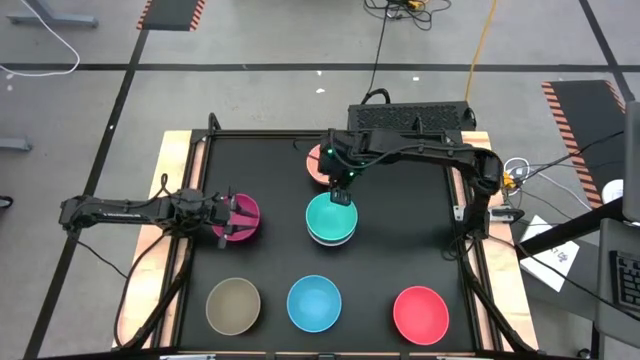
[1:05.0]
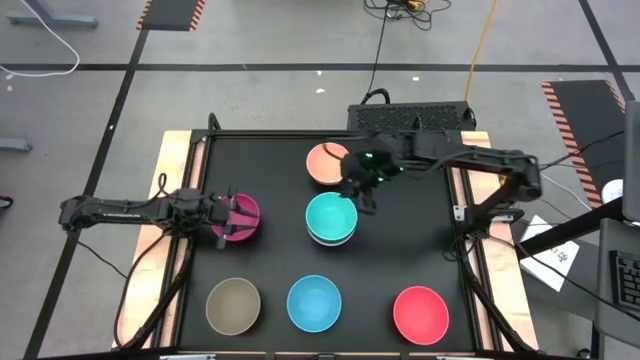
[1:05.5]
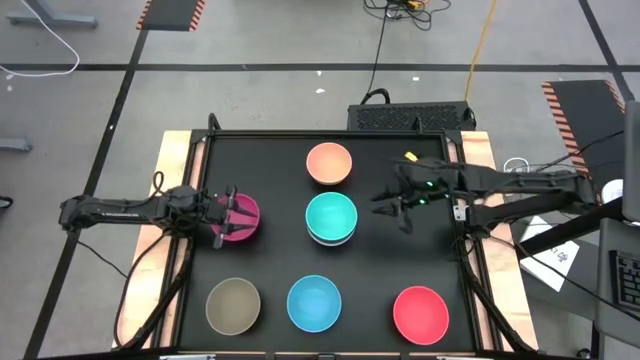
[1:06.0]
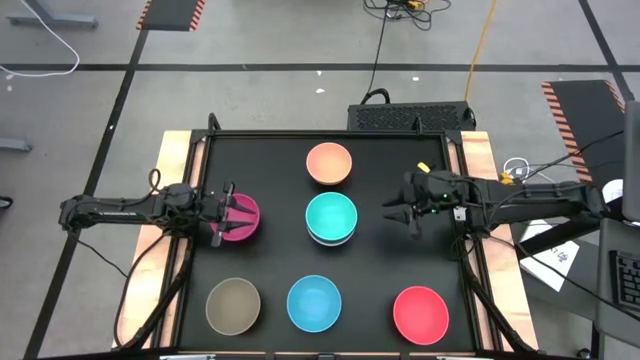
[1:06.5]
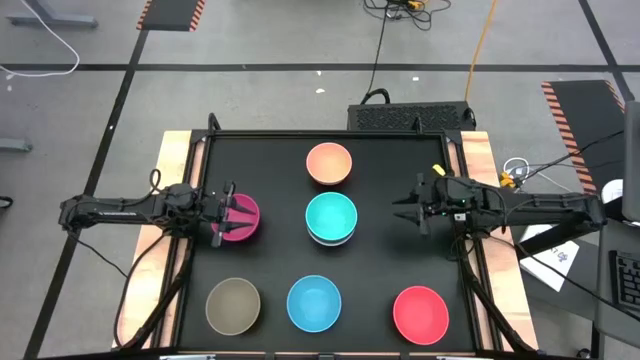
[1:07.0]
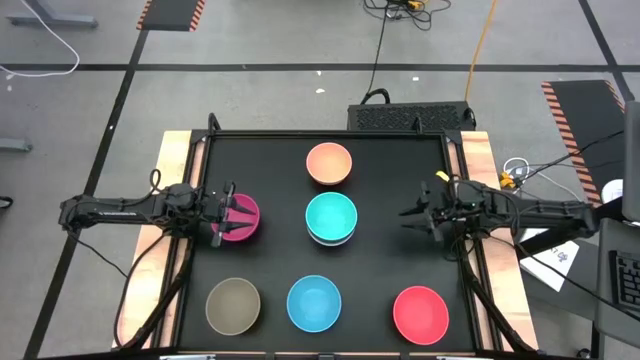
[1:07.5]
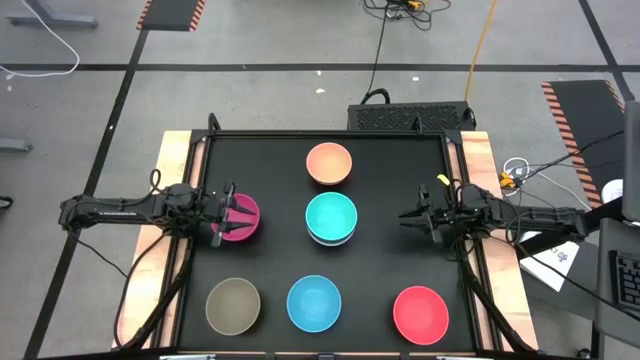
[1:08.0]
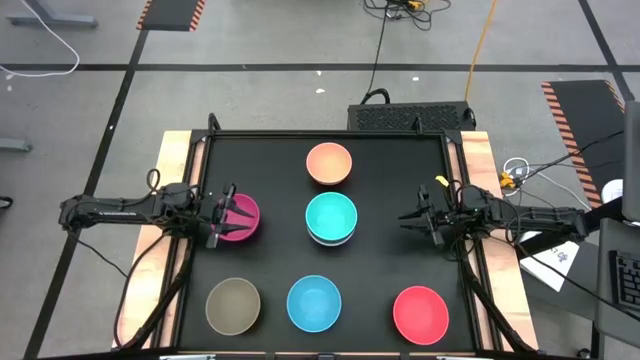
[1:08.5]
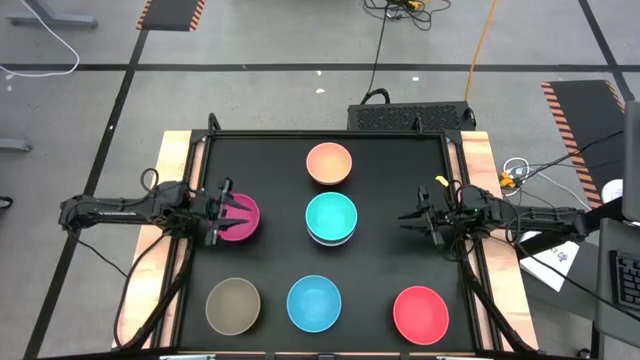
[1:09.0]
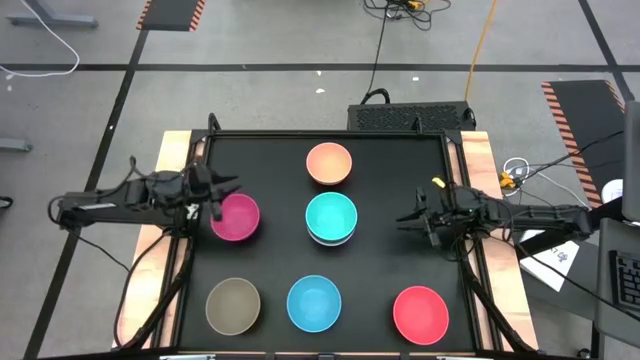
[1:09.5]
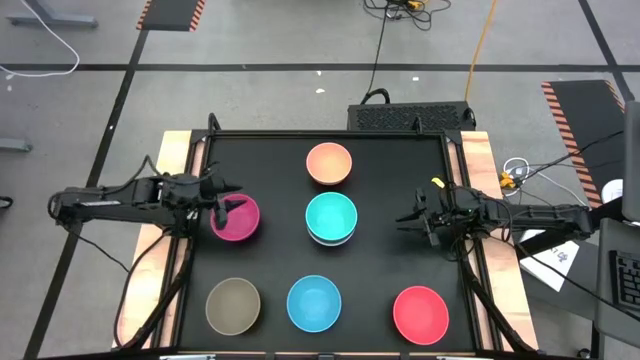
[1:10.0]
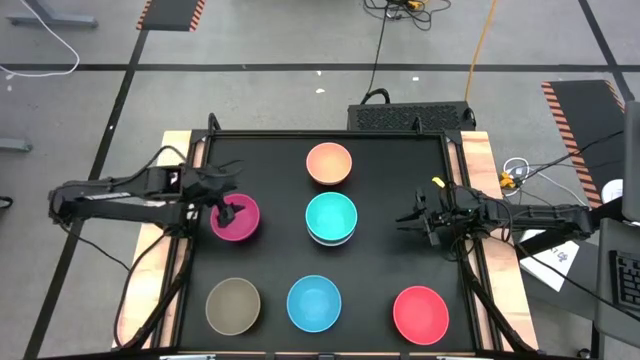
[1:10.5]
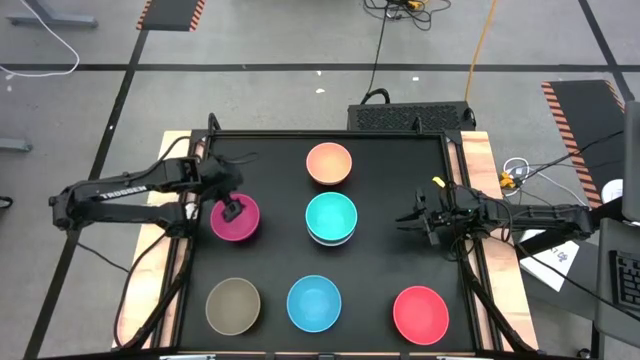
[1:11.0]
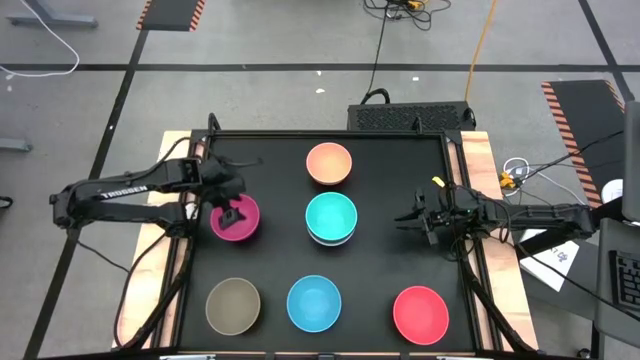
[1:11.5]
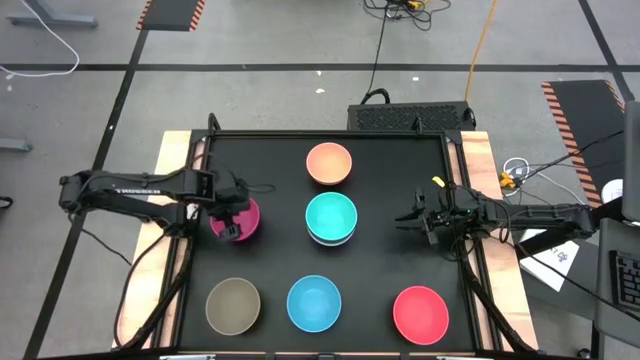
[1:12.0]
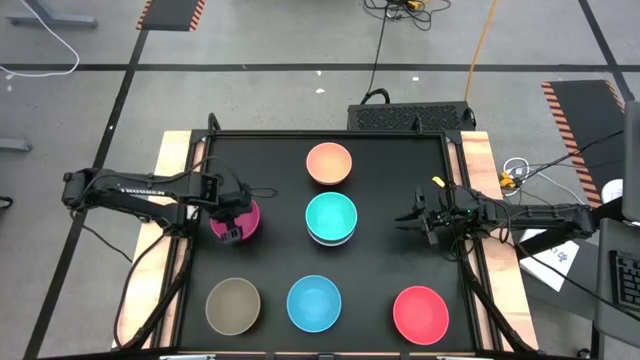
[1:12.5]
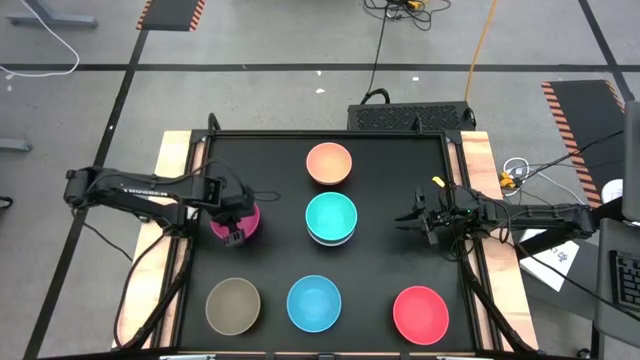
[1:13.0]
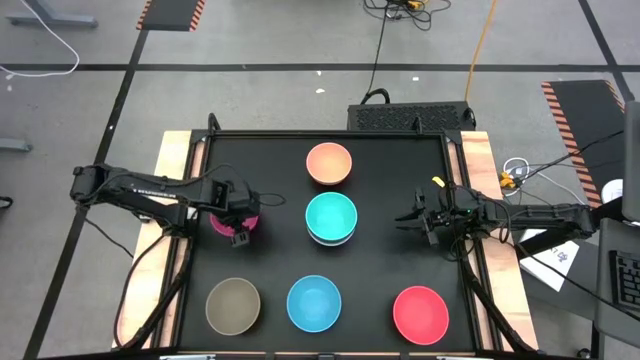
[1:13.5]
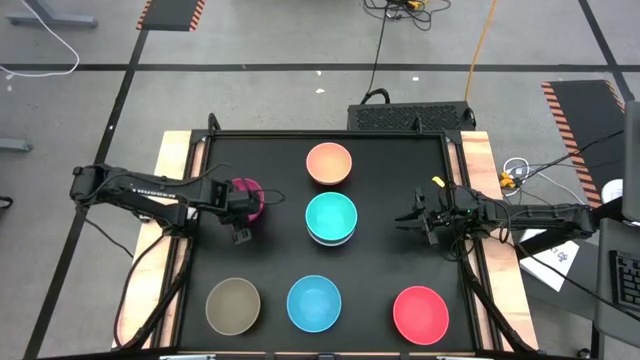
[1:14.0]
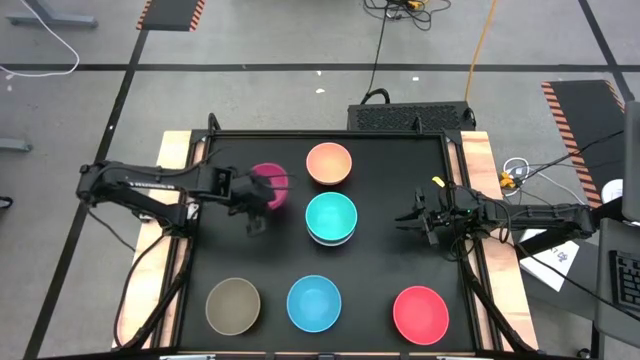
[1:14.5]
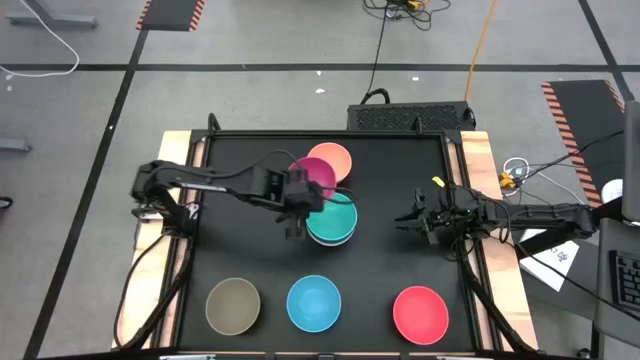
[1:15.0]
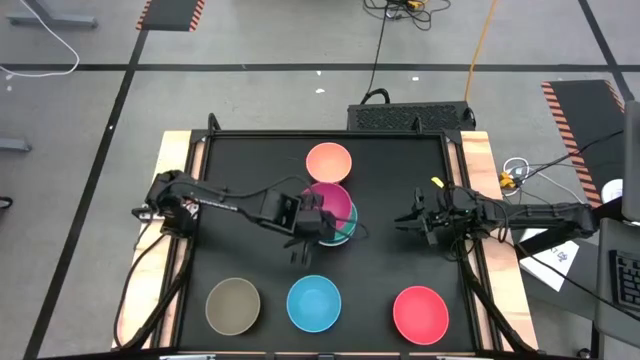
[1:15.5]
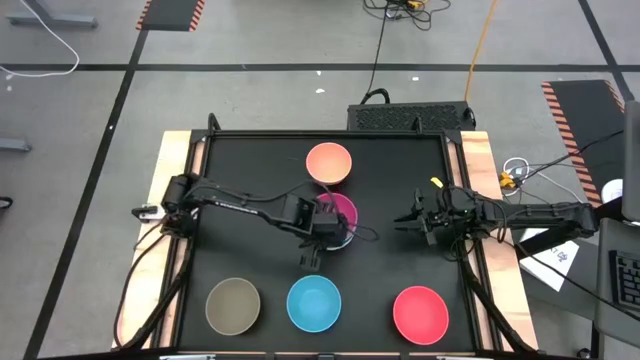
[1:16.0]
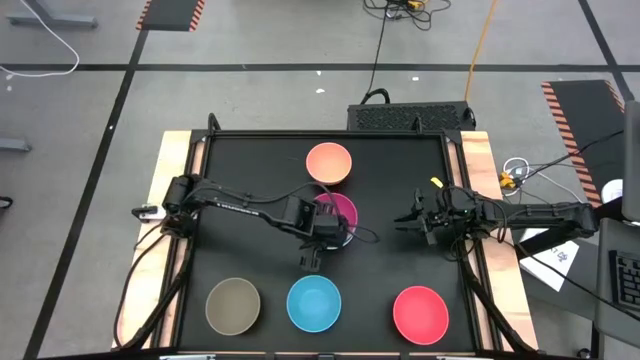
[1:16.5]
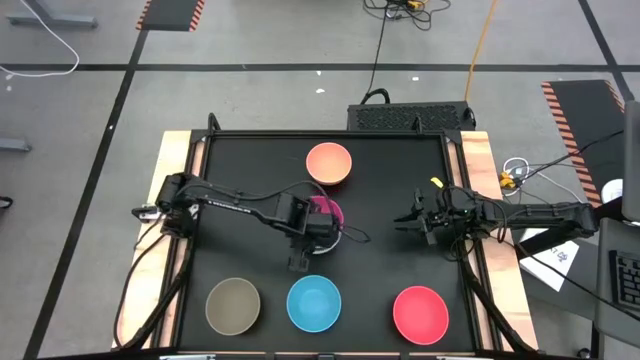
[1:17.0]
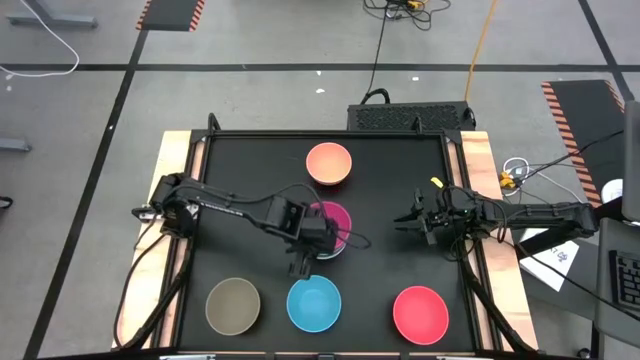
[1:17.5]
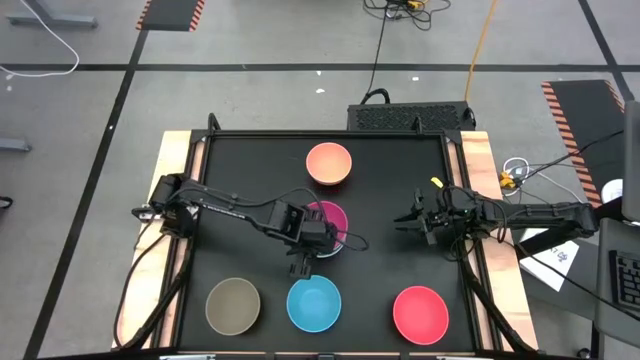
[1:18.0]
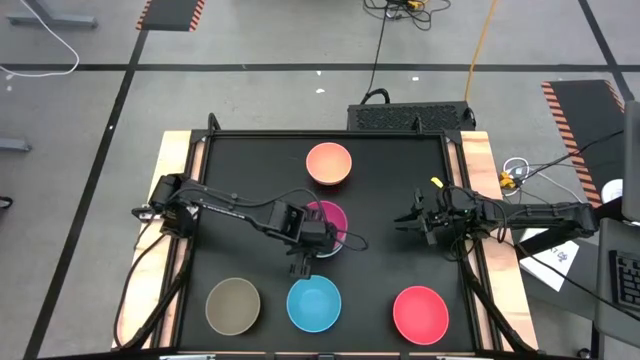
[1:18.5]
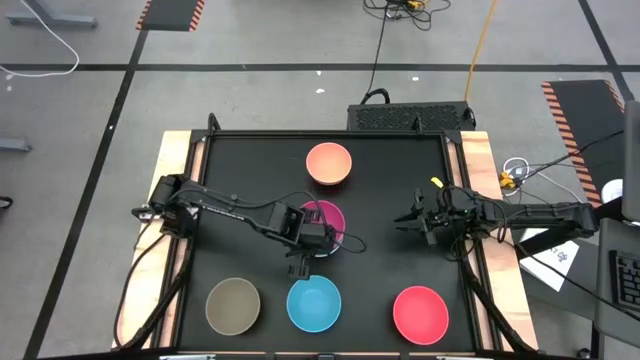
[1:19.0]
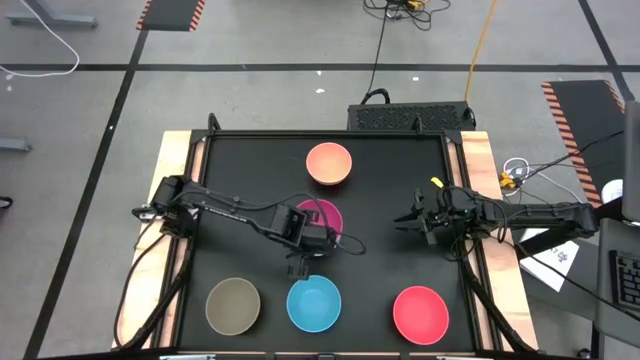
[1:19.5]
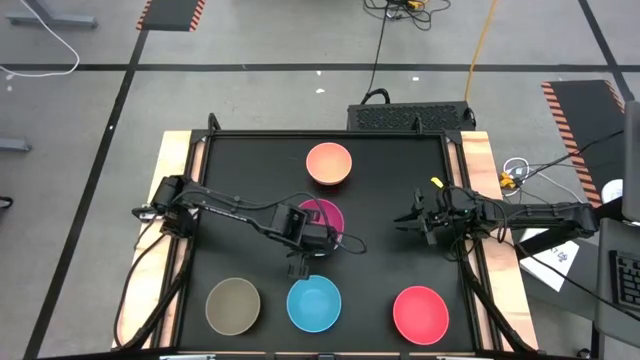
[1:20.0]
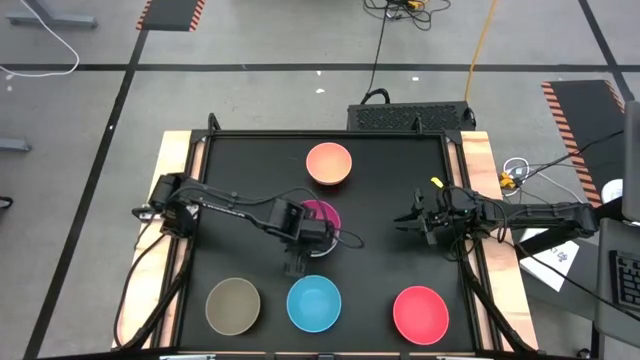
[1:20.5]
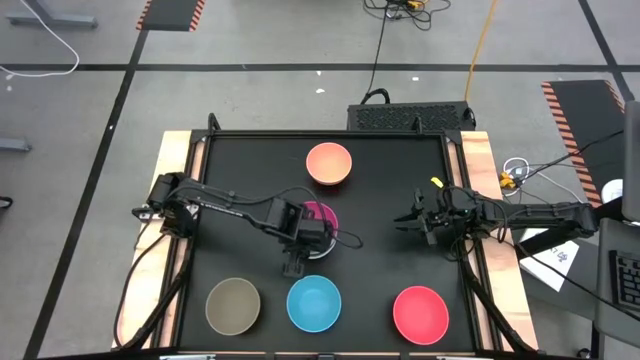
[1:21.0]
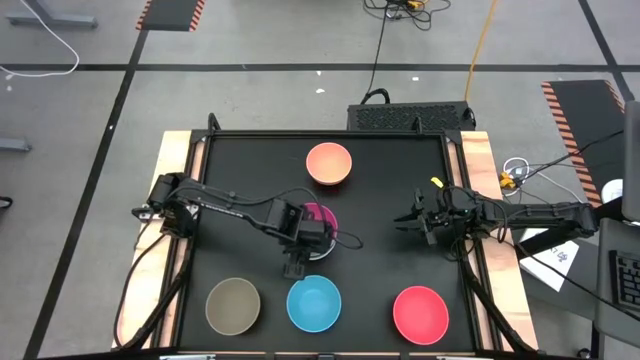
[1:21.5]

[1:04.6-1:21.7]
Task: Nest bowls inside each other
Stack the pink bowl on the light blue bowl

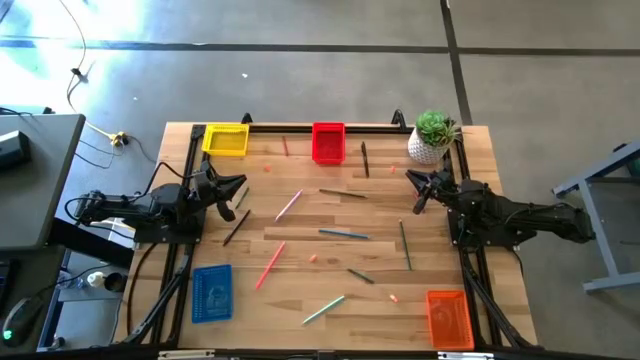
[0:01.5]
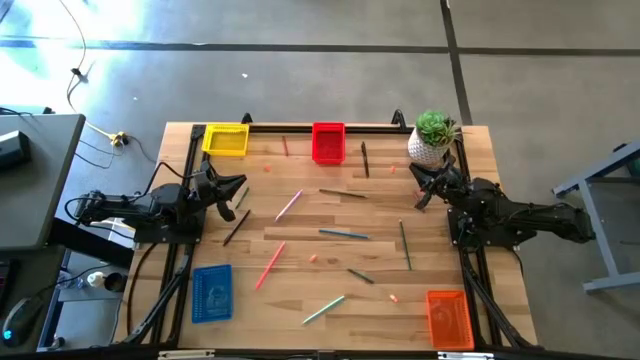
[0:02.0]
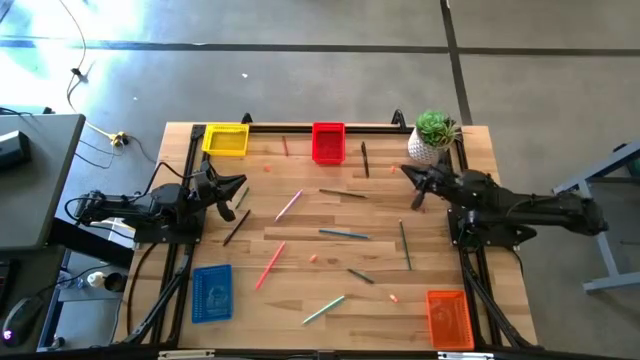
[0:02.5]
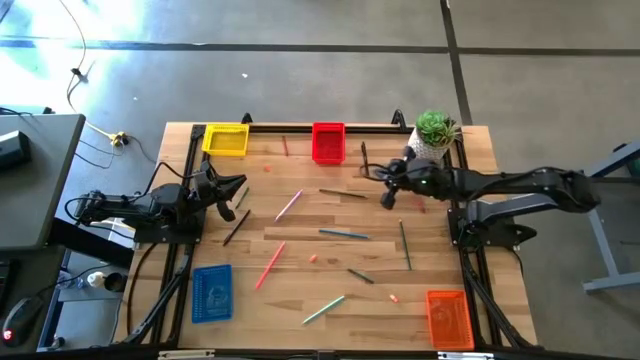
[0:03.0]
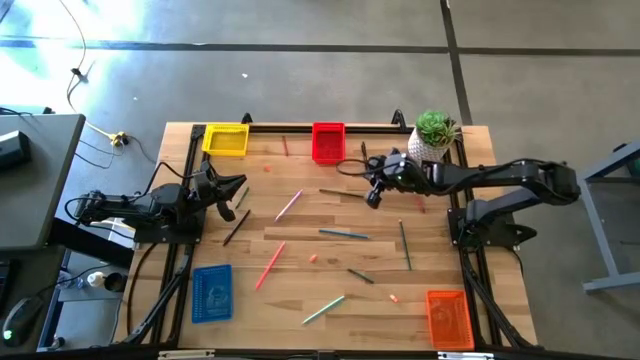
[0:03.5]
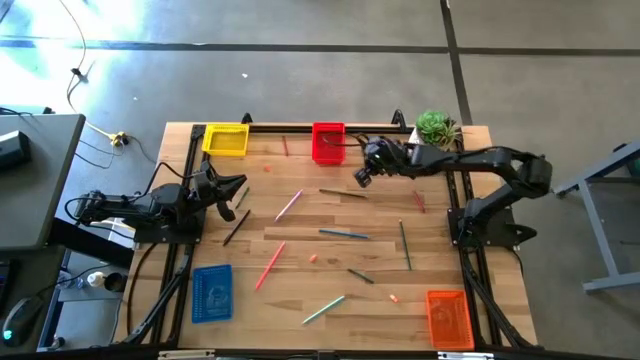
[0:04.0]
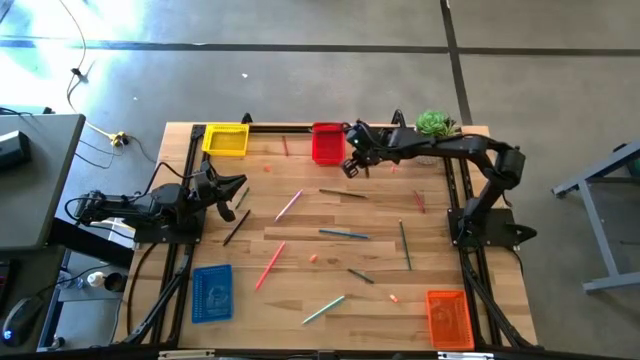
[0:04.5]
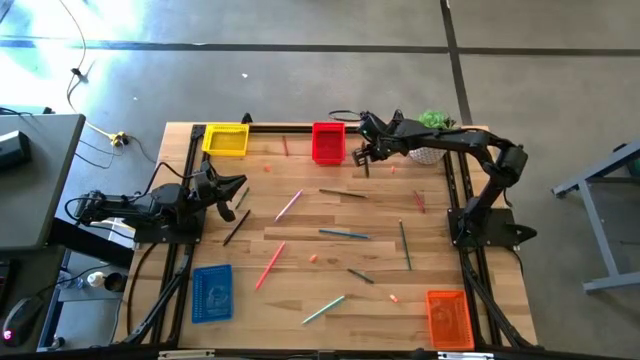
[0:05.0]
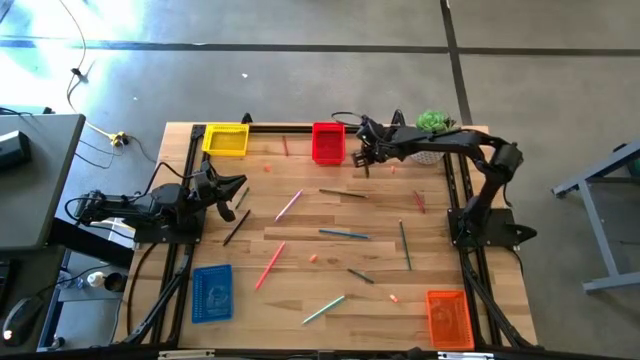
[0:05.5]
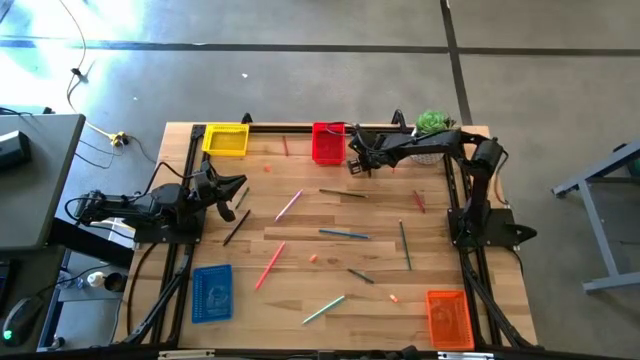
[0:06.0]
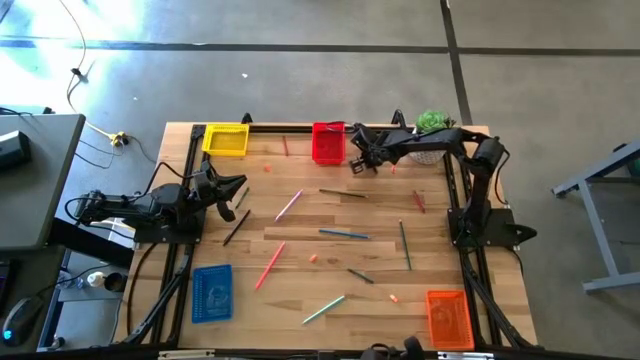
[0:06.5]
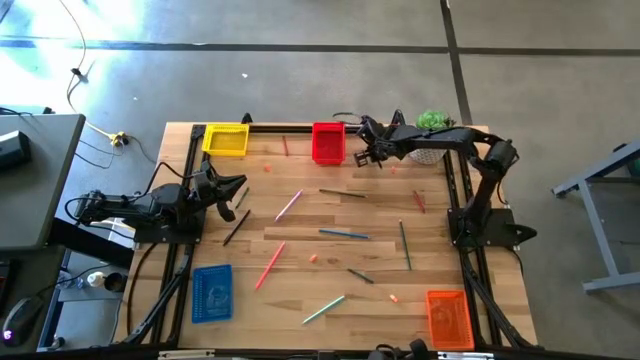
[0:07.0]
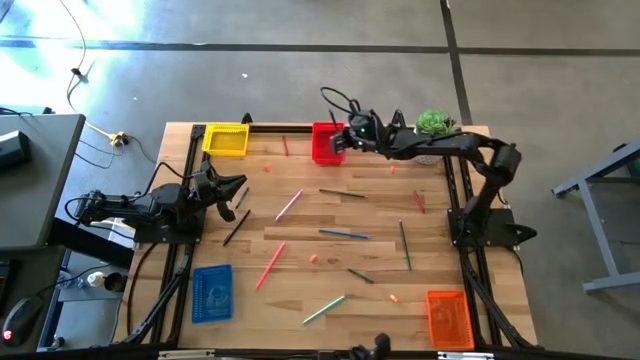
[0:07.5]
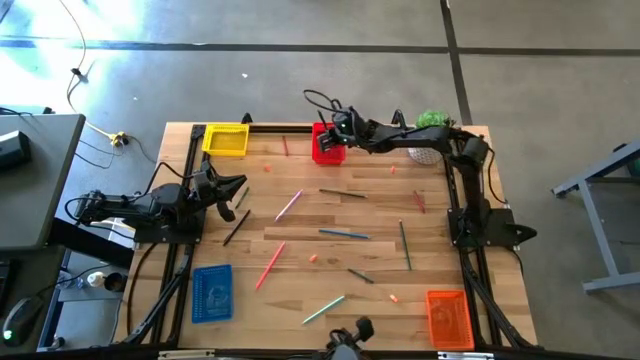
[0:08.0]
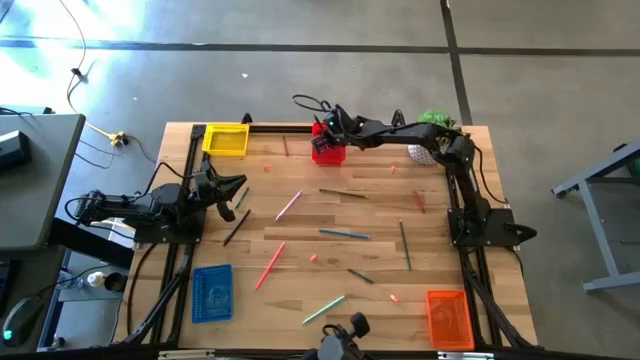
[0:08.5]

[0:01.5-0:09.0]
Task: Sort crayons/erasers/pens/pencils in bins
Put the top black pen into the red bin
